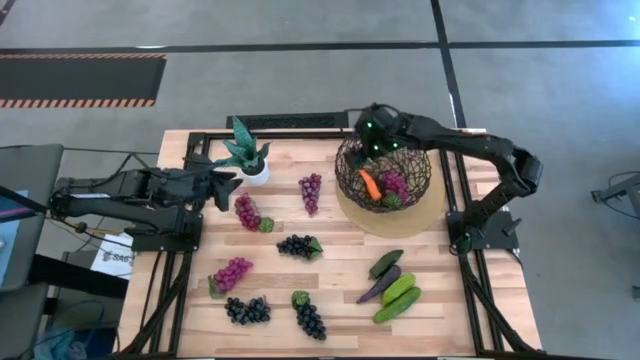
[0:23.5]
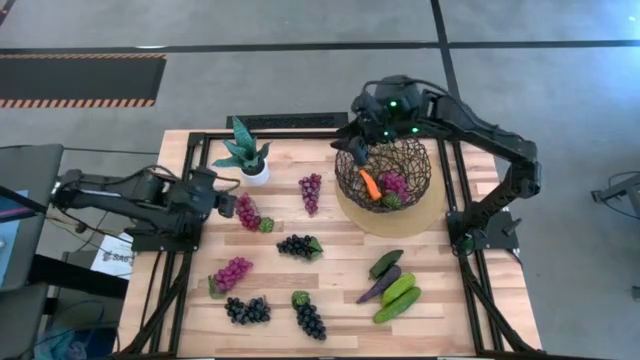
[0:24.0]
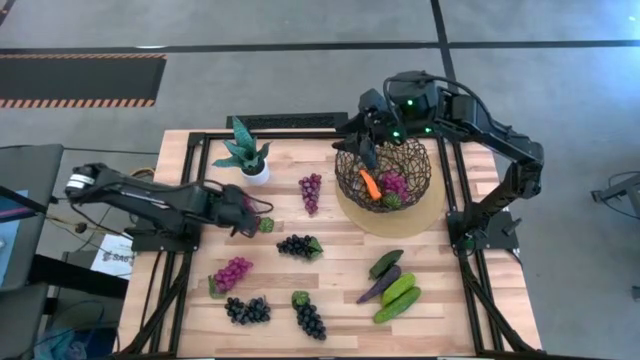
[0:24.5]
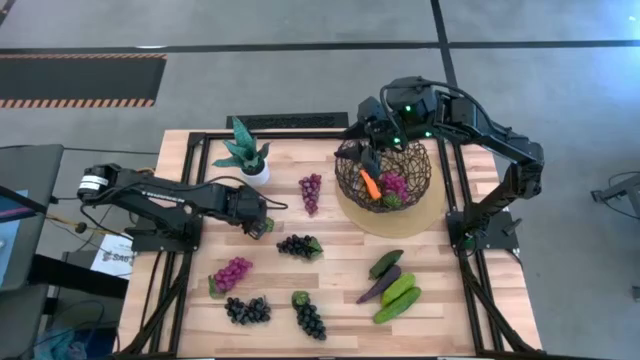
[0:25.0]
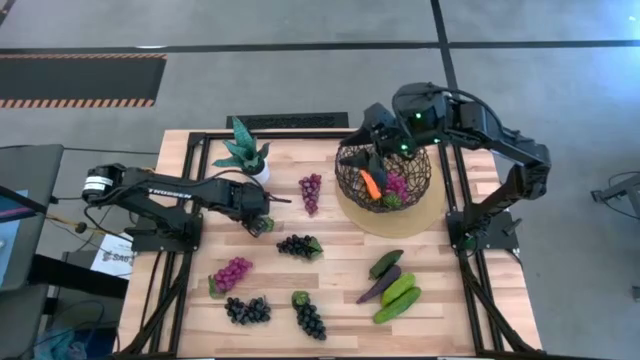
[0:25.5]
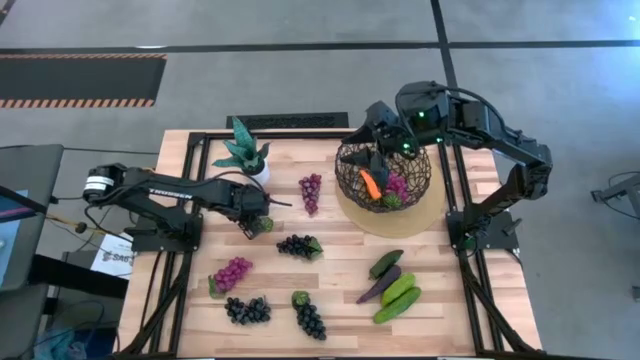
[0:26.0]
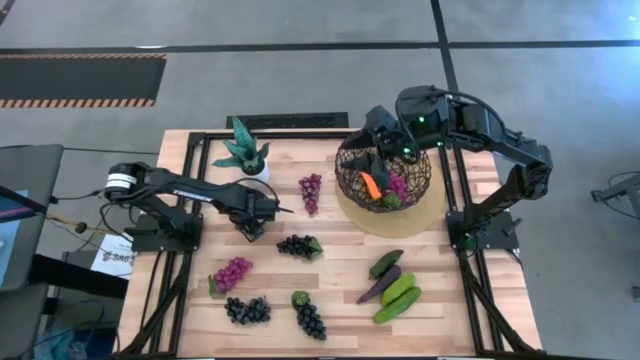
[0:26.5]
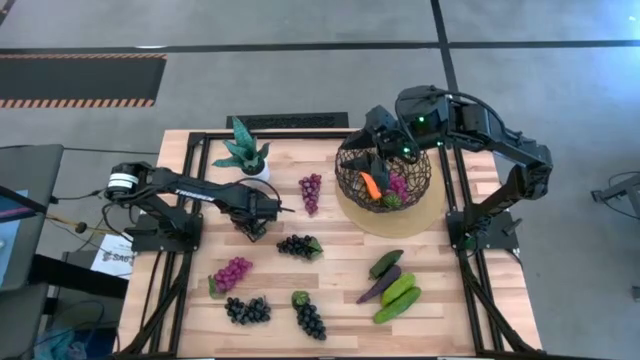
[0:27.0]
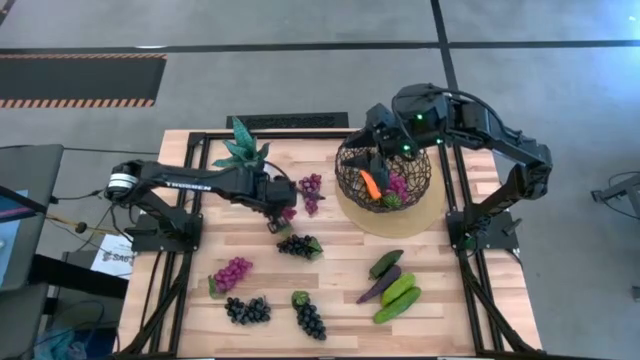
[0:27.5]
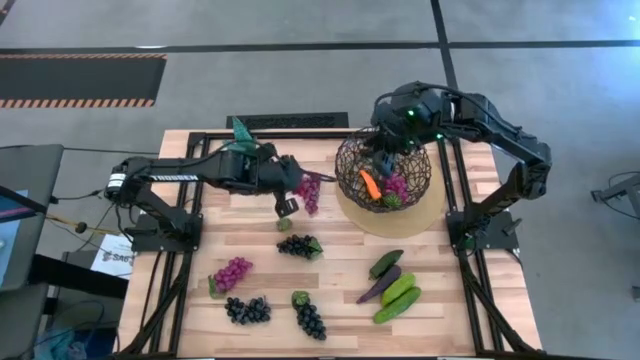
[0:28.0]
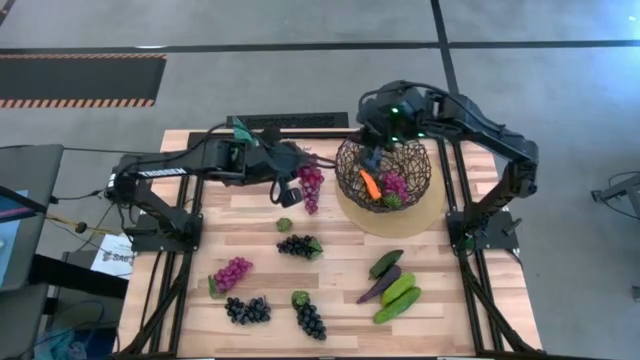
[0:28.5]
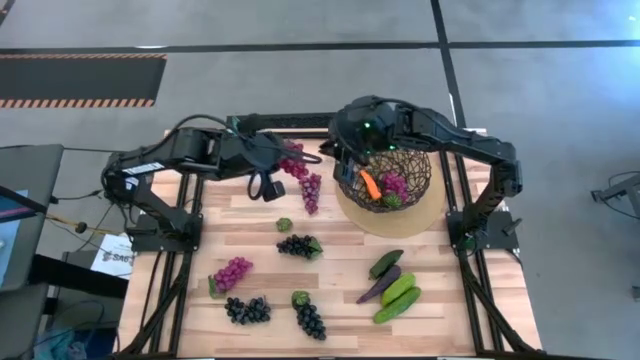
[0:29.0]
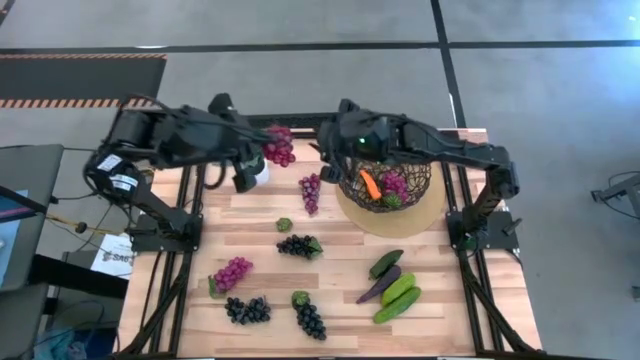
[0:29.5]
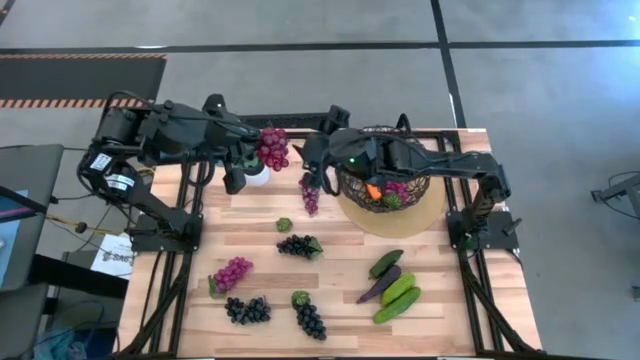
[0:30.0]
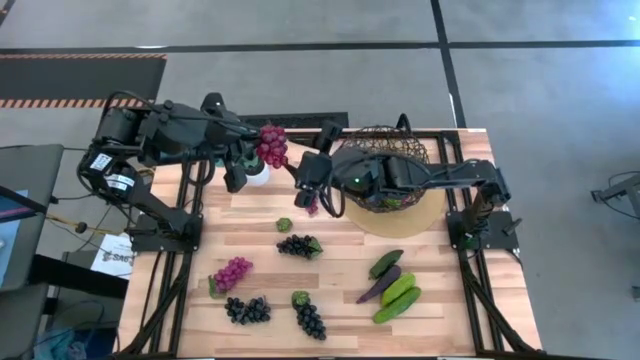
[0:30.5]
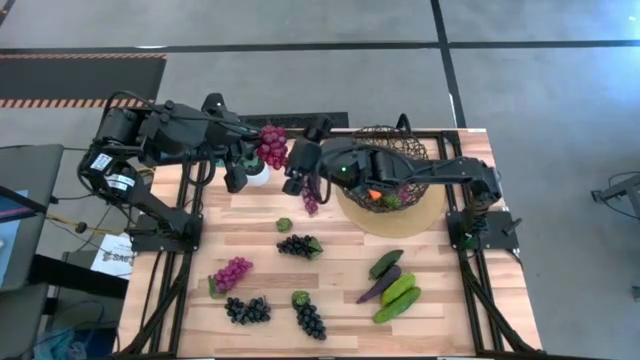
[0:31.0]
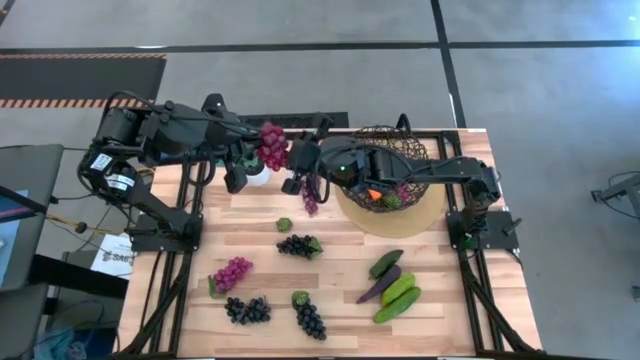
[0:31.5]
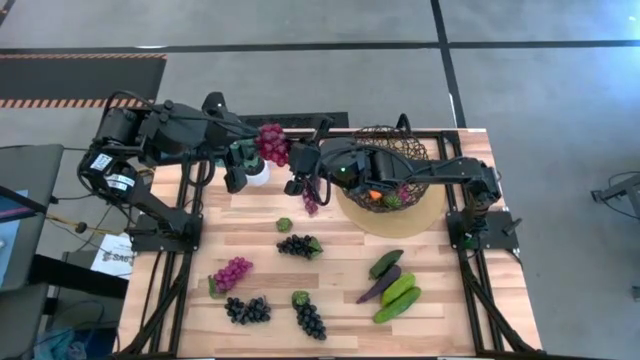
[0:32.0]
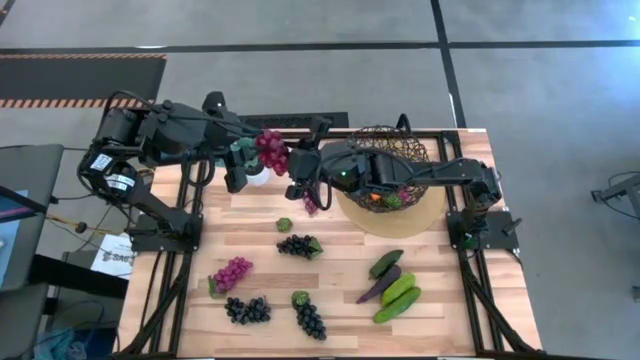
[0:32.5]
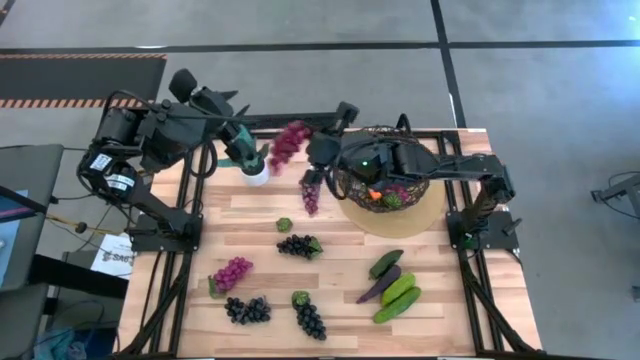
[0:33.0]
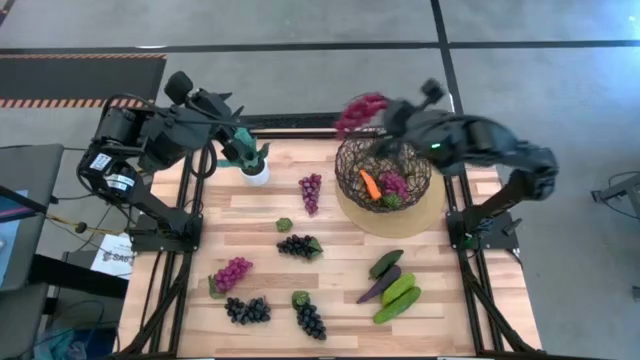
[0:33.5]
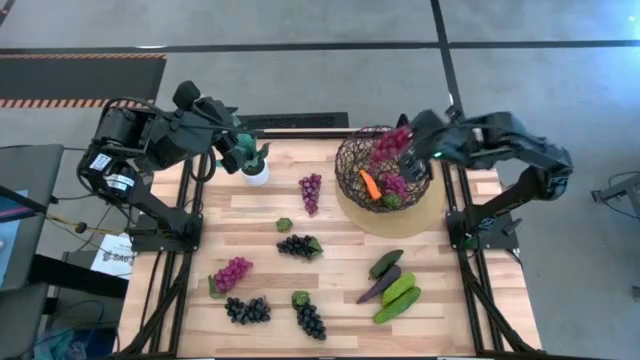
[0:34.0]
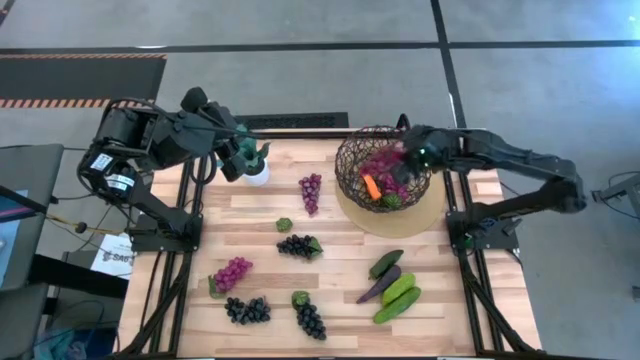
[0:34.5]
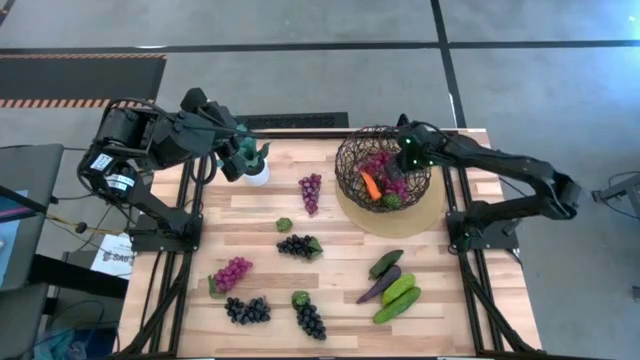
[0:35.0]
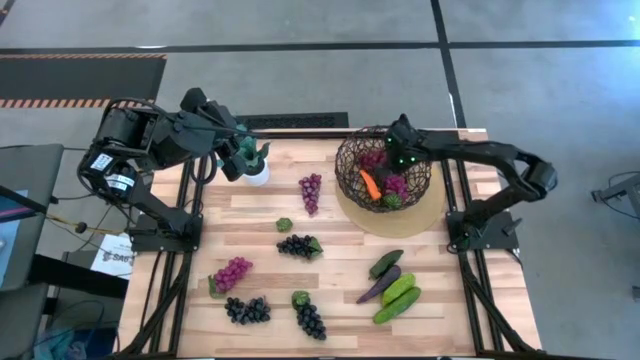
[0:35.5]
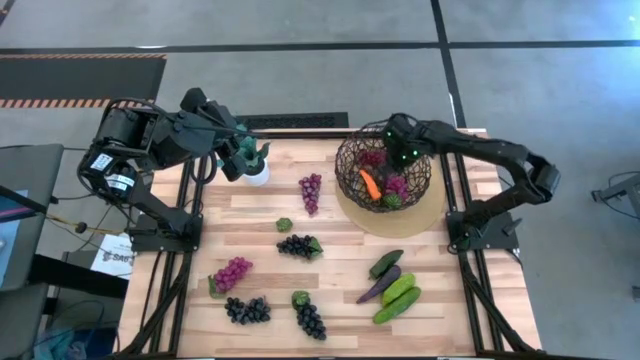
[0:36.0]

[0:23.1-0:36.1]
Task: Build produce basket
Put the purple grapes into the black wire basket

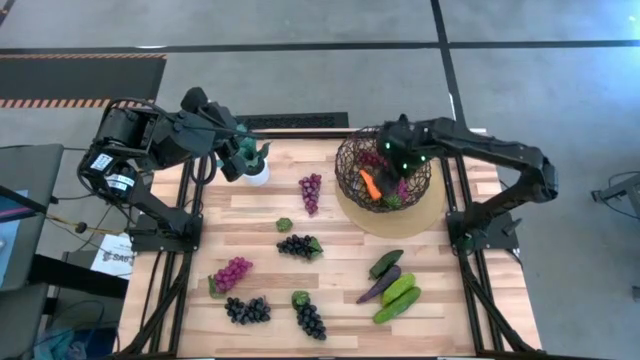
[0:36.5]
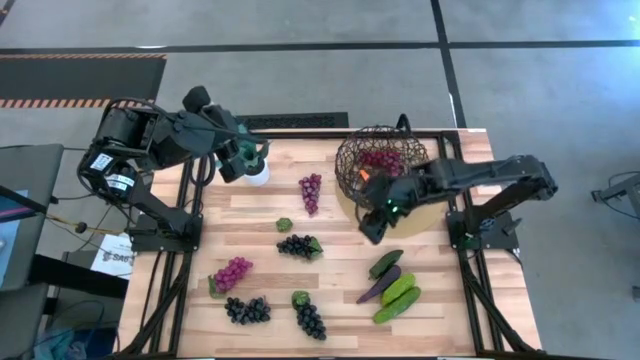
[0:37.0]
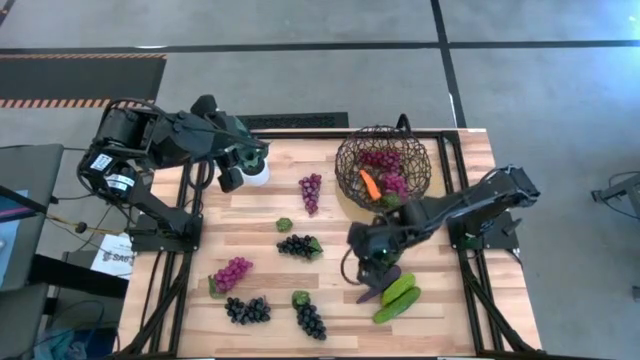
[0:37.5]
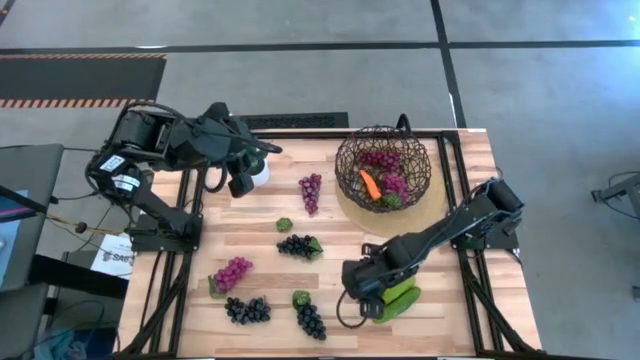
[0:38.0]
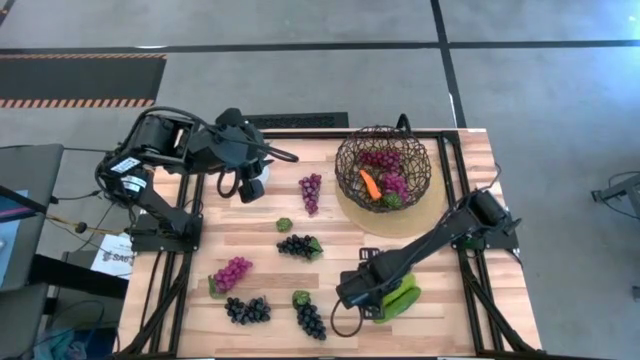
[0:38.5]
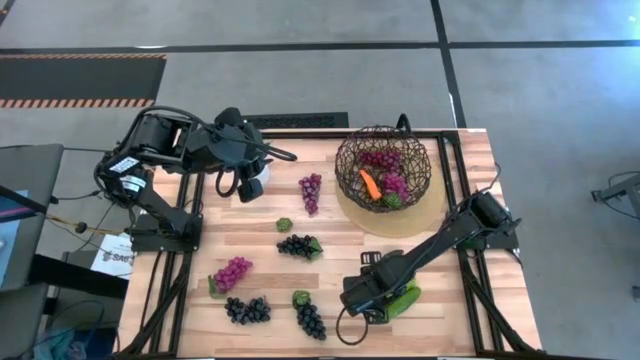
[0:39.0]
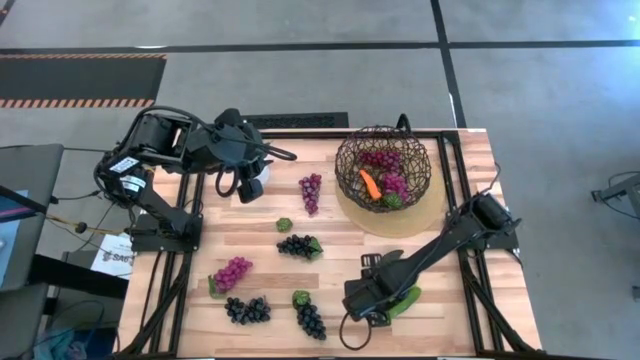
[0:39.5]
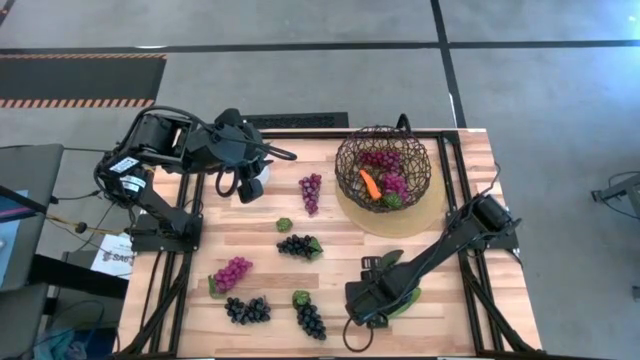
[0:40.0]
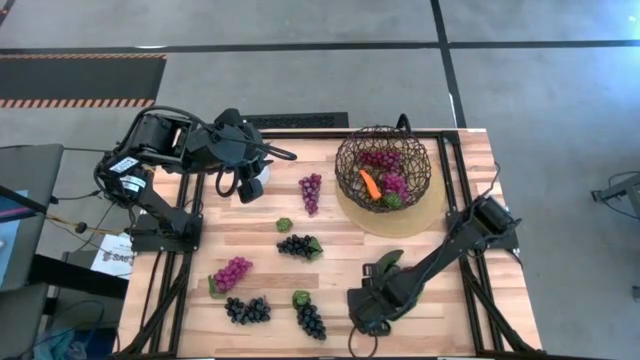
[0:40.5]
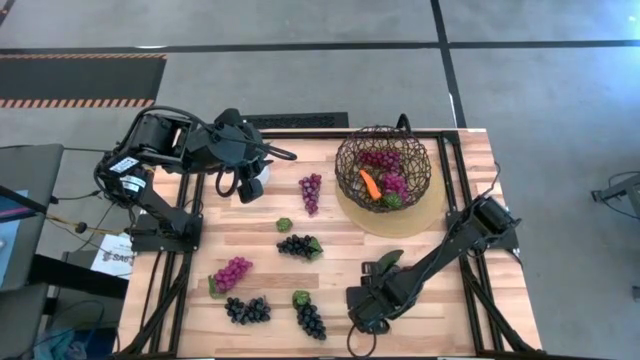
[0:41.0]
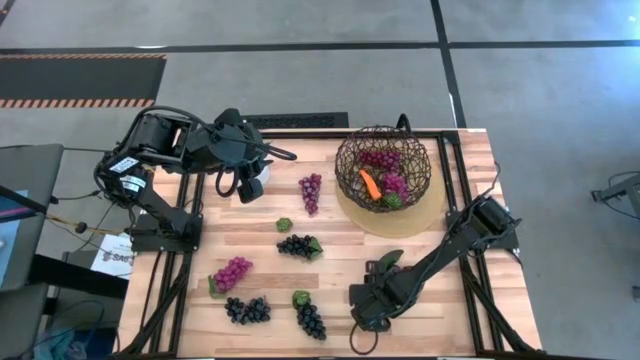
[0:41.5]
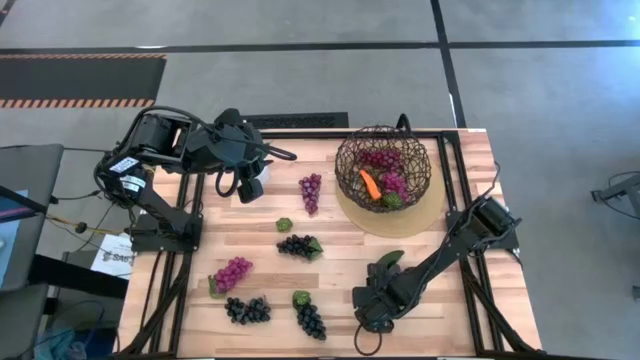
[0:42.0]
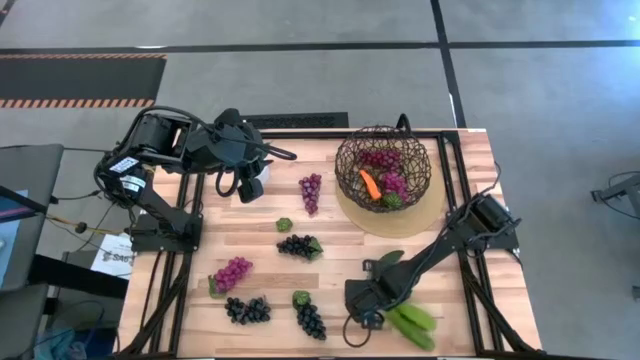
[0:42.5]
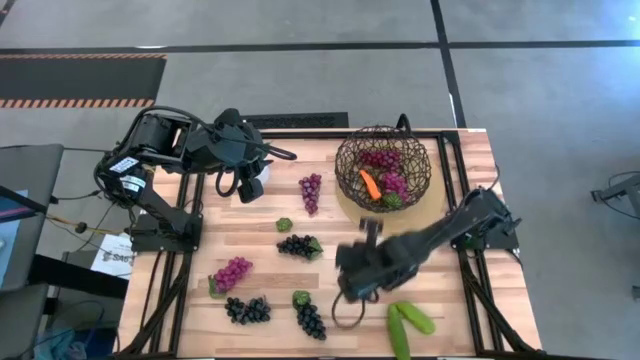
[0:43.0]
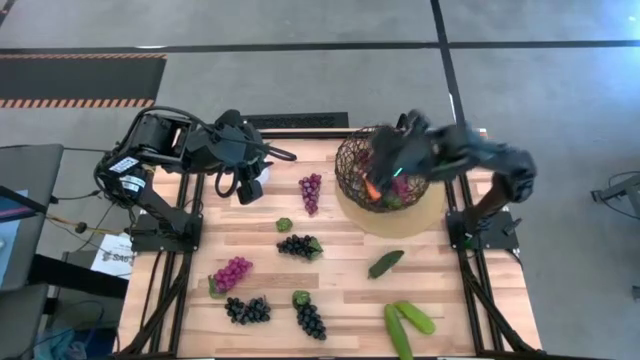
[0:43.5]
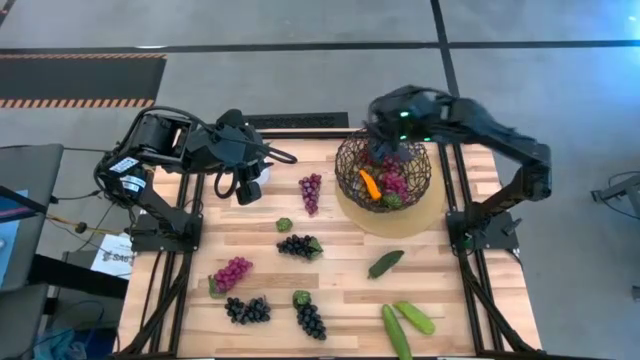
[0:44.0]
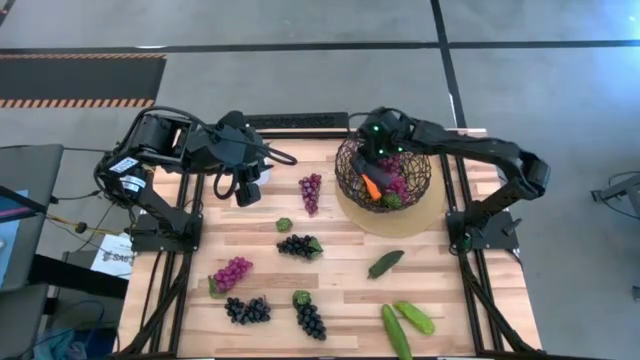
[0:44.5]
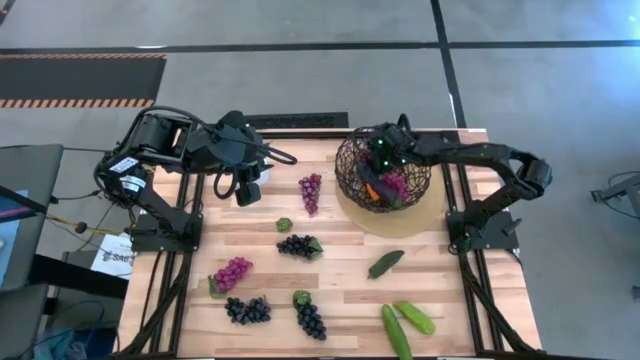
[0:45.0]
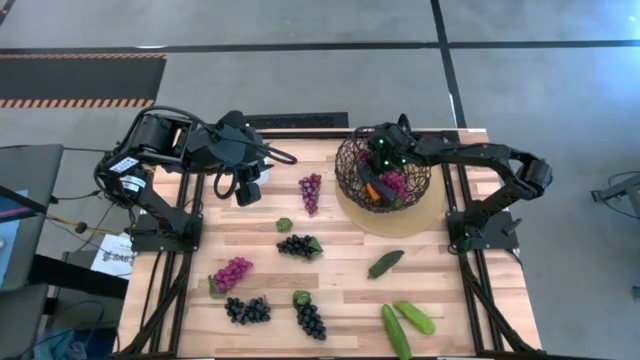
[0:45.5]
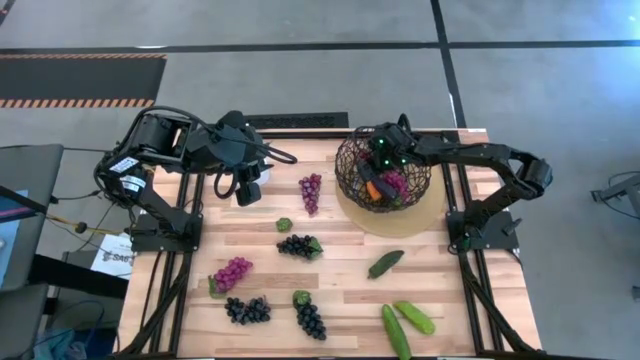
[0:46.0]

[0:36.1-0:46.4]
Put the violet eggplant into the black wire basket
